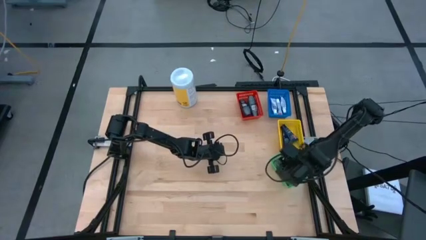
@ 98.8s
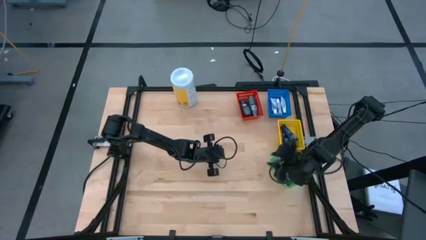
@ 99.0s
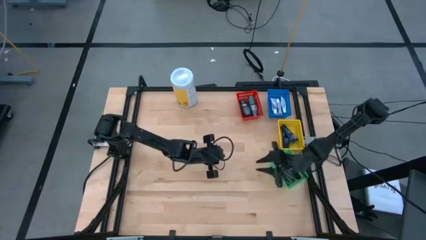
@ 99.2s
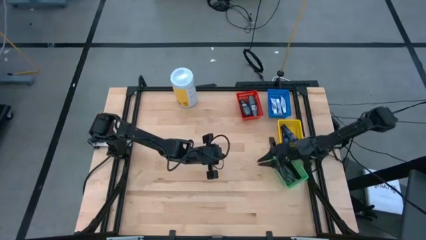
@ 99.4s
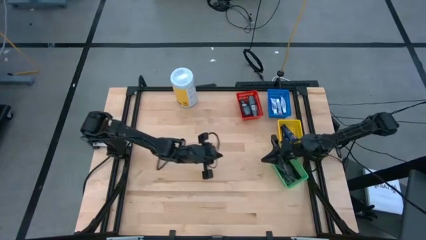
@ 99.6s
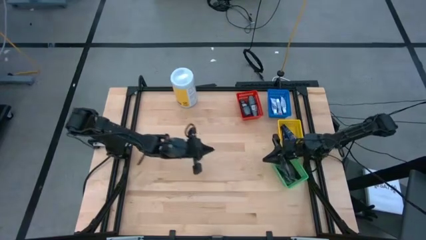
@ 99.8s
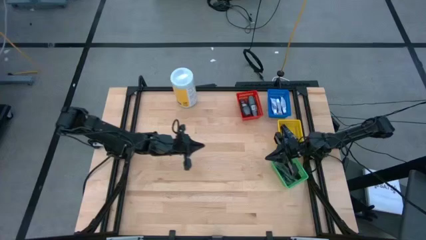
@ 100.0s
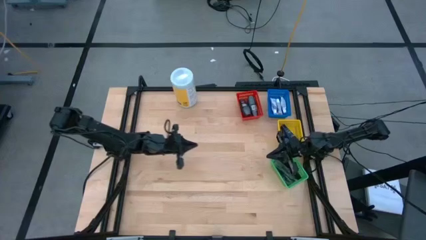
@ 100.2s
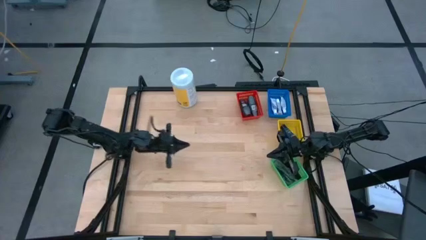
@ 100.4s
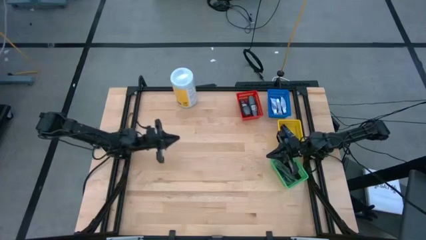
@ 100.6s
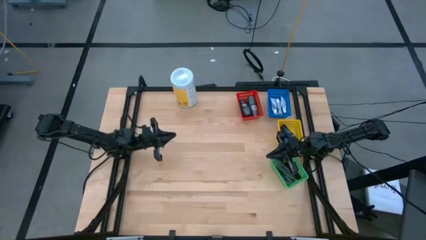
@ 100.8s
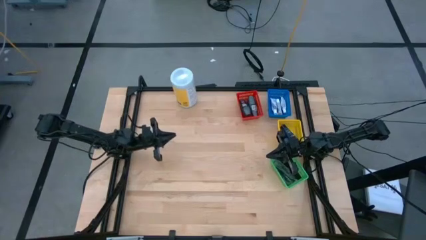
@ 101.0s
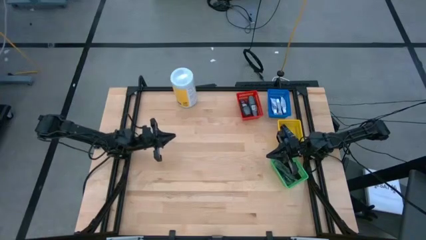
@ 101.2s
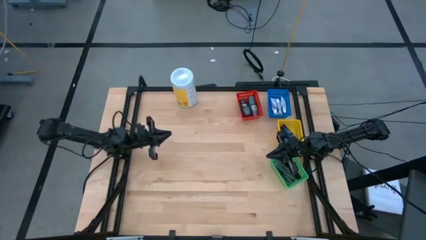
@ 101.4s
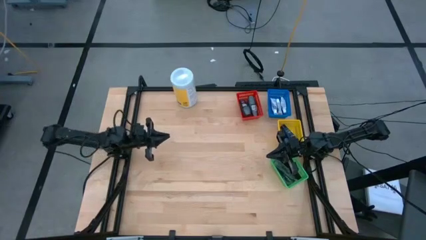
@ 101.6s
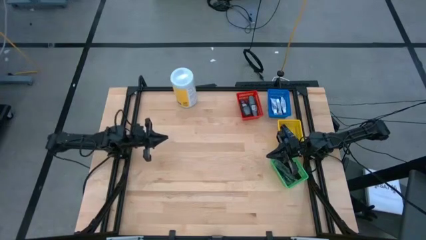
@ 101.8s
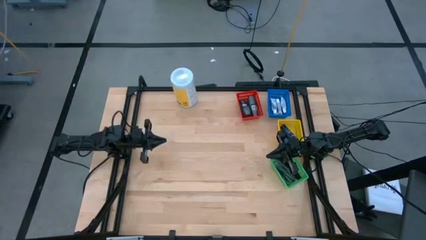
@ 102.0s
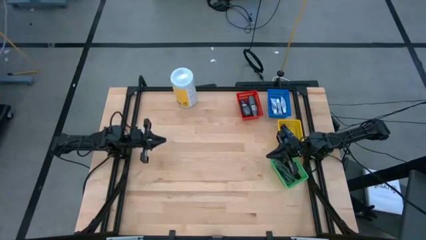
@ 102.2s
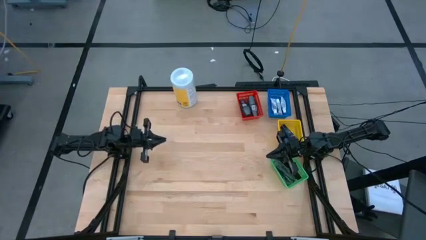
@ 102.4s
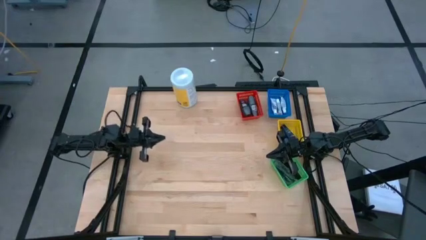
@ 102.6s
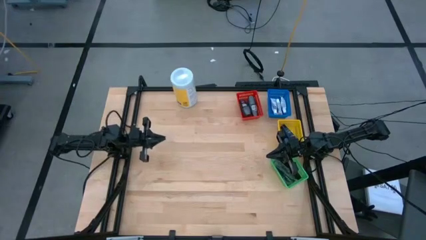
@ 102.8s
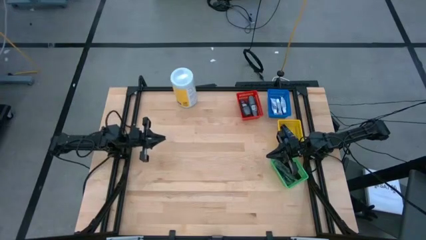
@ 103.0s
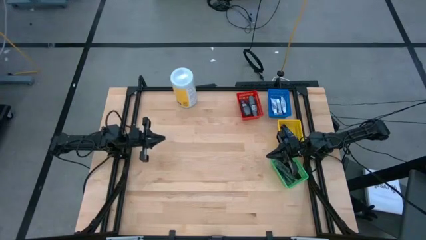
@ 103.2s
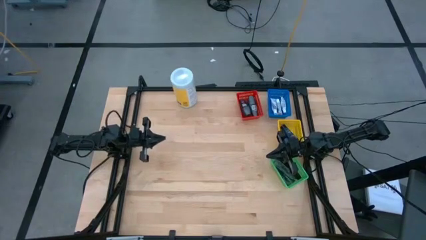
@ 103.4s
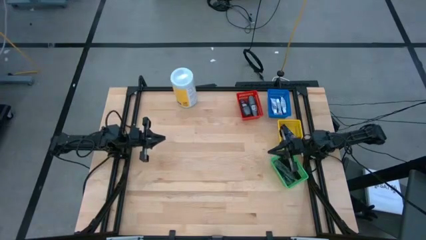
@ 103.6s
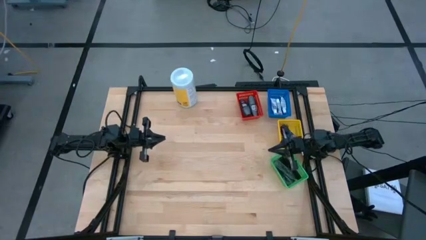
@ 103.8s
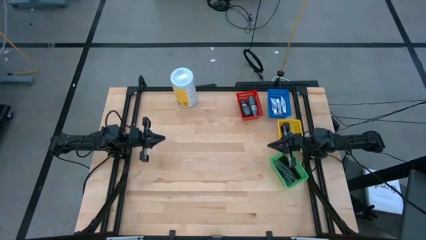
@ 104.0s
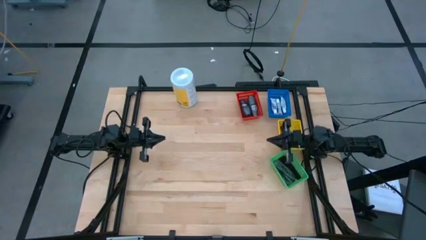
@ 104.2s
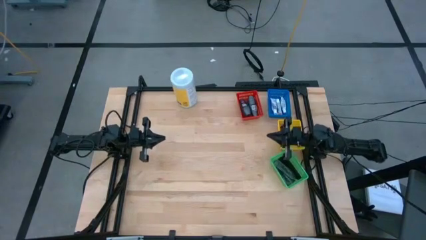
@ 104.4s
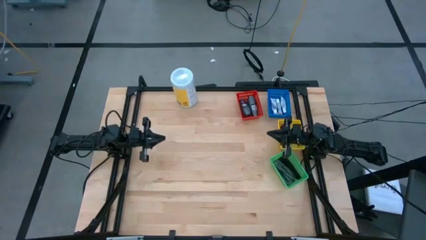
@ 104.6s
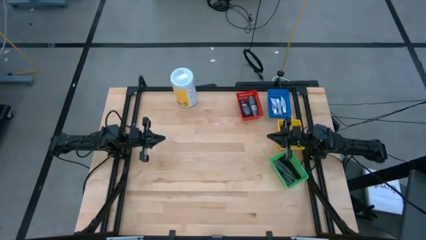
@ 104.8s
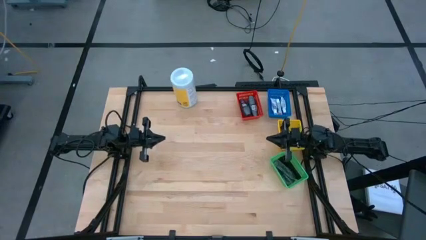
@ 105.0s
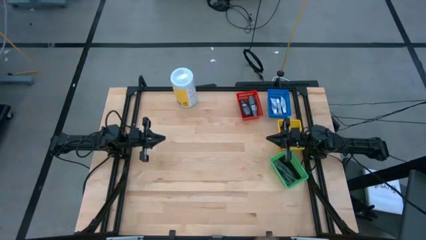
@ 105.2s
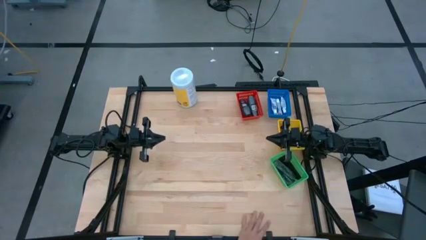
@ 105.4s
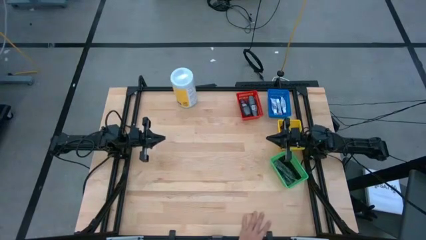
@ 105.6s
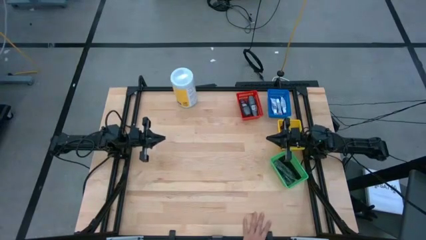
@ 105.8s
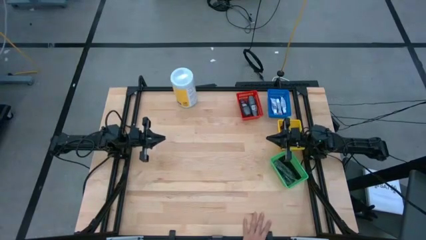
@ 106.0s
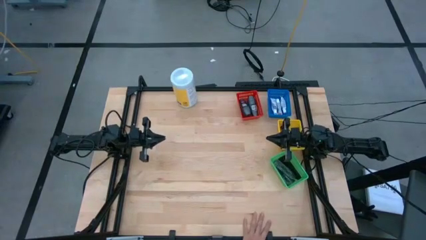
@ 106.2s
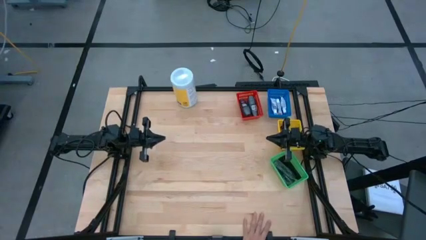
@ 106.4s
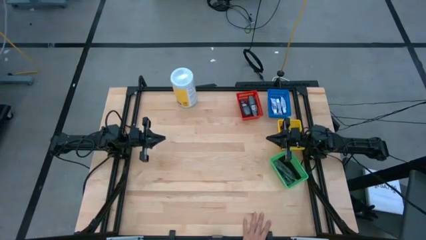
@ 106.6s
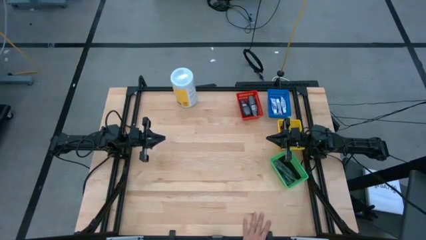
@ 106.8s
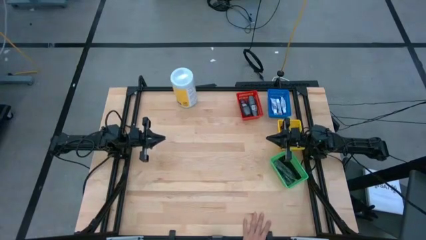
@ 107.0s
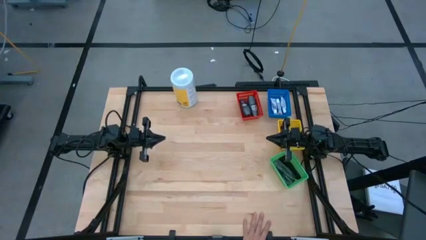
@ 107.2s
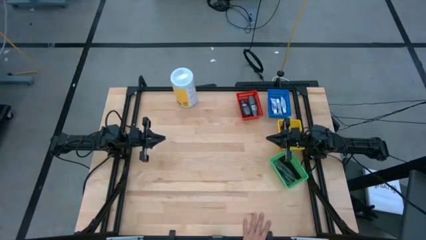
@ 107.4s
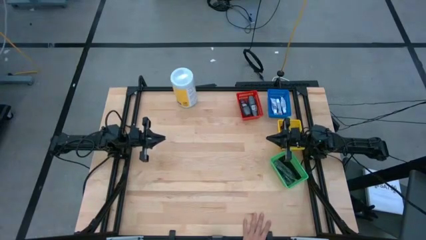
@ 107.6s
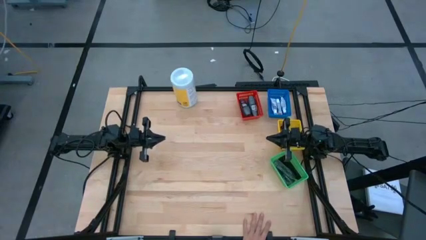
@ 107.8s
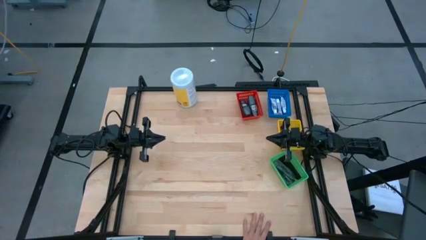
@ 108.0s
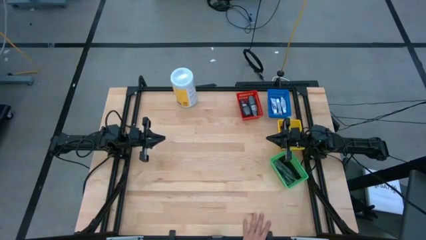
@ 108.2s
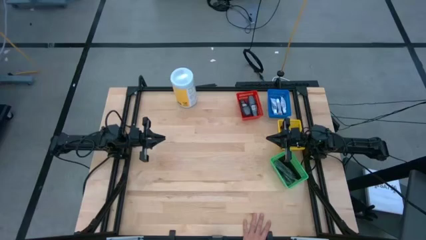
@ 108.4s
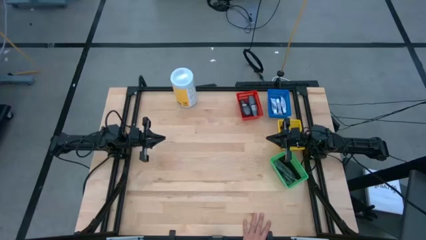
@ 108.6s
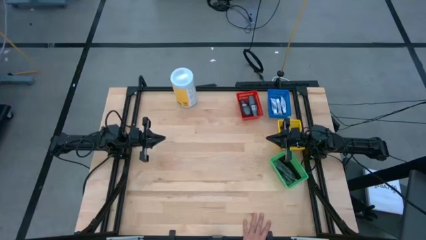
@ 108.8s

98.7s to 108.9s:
Task: Pick & Place Travel size toiletries
Return to Home Position

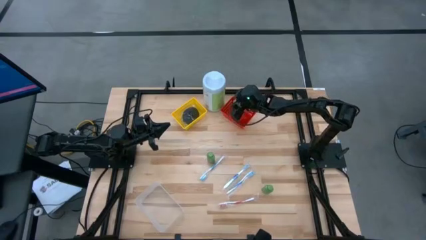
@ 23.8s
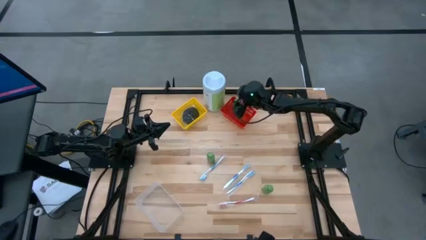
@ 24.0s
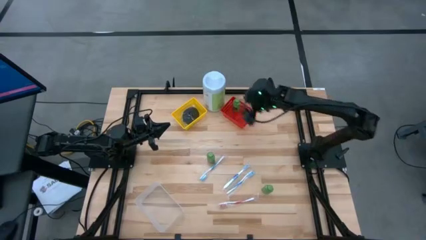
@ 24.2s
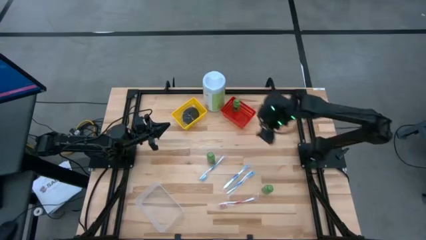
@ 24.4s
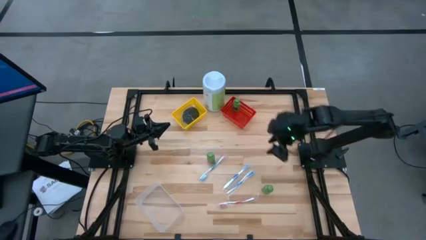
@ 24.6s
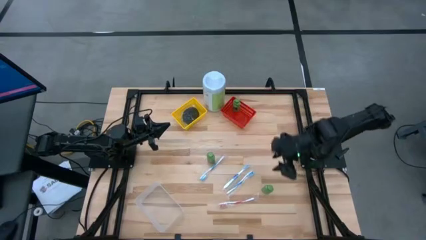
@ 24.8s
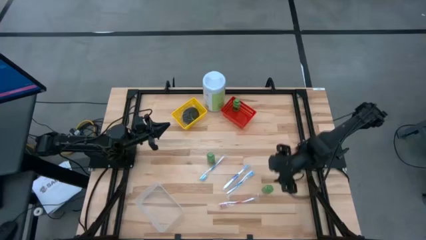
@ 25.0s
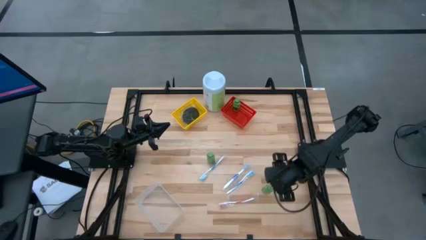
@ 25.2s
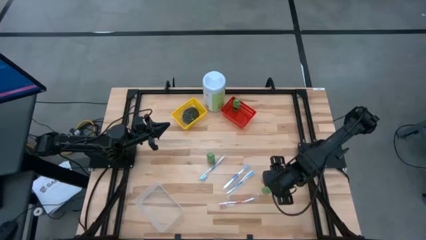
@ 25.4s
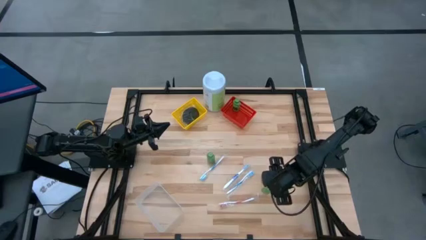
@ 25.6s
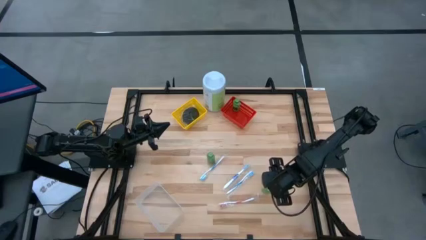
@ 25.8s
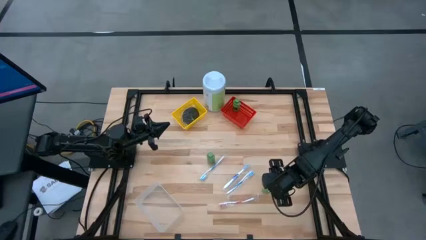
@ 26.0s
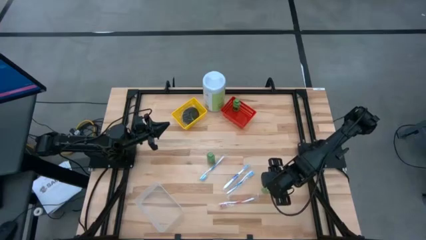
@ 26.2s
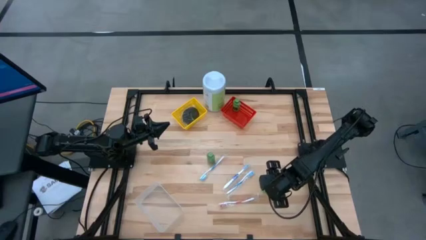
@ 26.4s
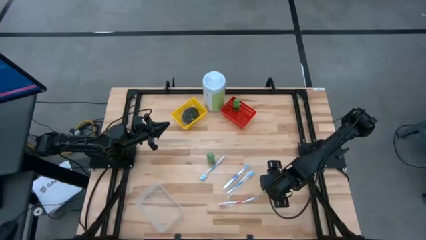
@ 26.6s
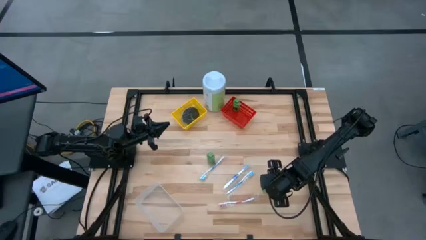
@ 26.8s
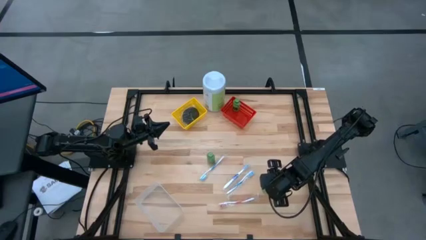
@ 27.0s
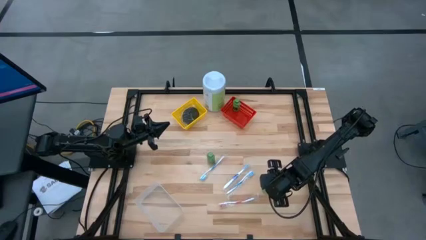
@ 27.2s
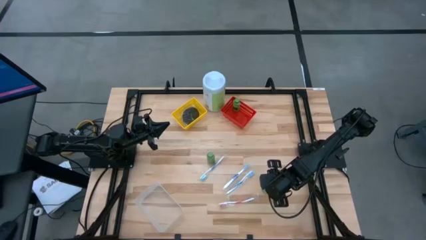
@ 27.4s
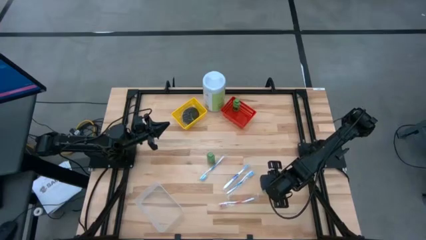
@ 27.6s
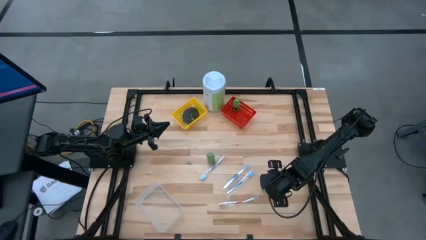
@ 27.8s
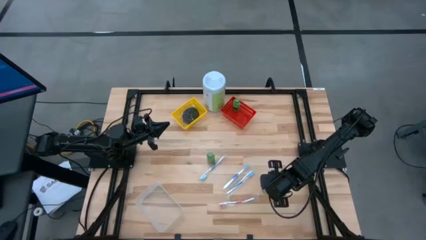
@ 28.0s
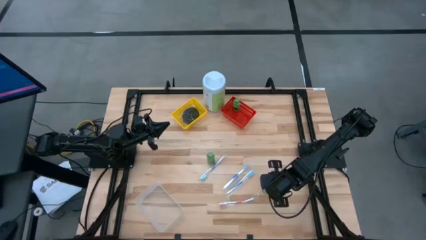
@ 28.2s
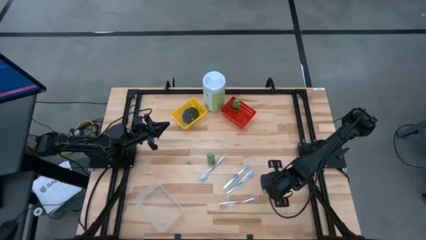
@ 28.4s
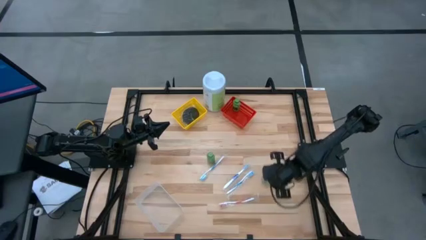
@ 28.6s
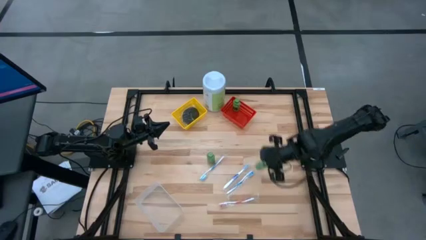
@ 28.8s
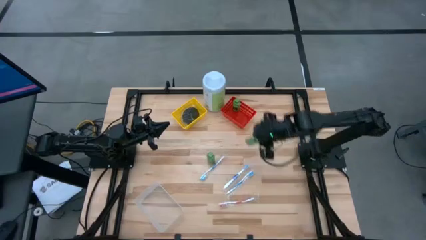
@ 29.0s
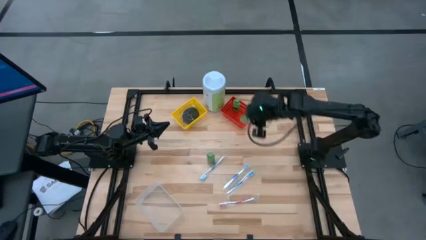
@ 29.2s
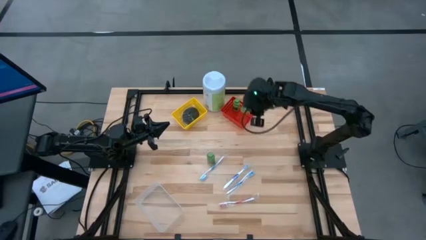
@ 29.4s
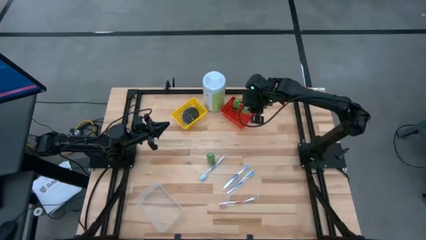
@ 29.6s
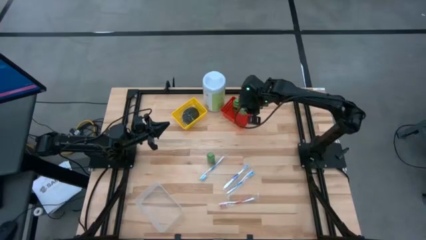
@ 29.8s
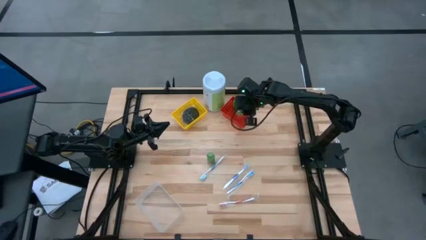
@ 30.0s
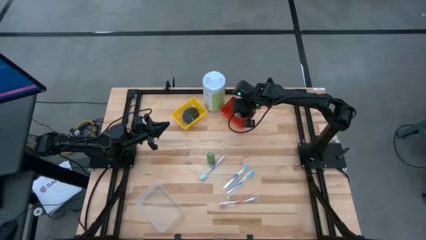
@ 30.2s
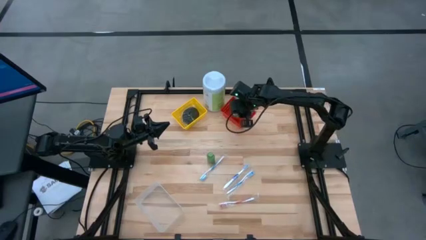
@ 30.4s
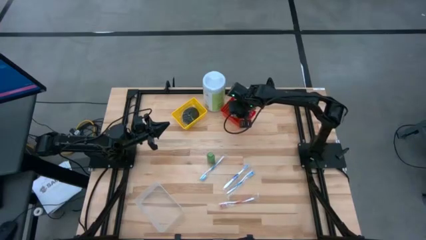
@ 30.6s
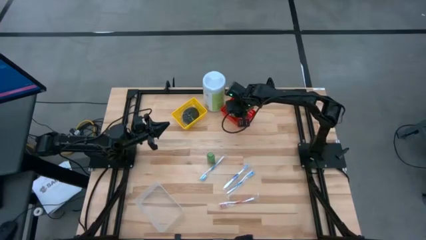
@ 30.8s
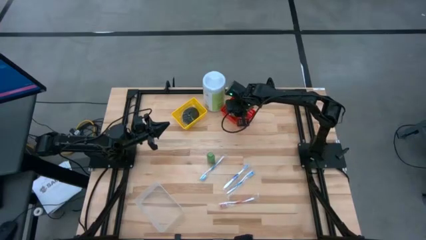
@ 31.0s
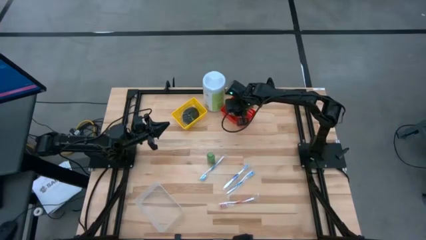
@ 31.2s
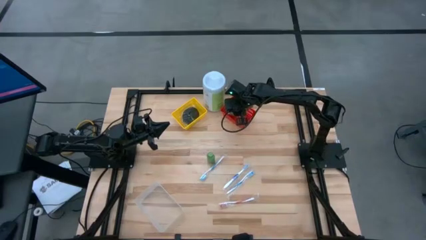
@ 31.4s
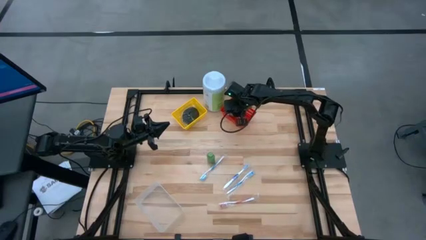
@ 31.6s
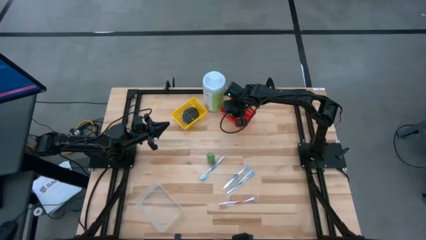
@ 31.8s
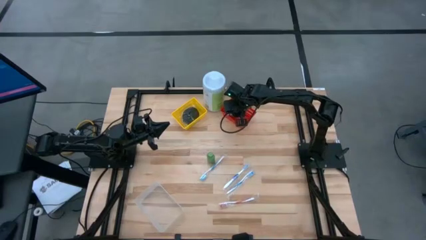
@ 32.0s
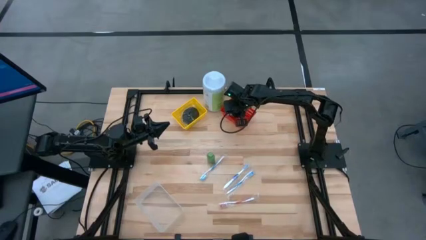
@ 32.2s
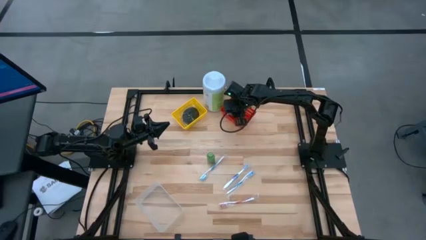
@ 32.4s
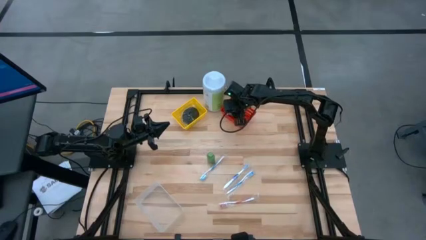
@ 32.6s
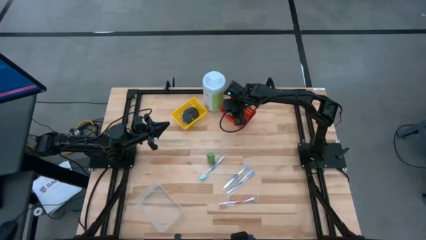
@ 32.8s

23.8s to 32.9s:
Task: Pick & Place Travel size toiletries
Put the bottom green shampoo into the red bin
